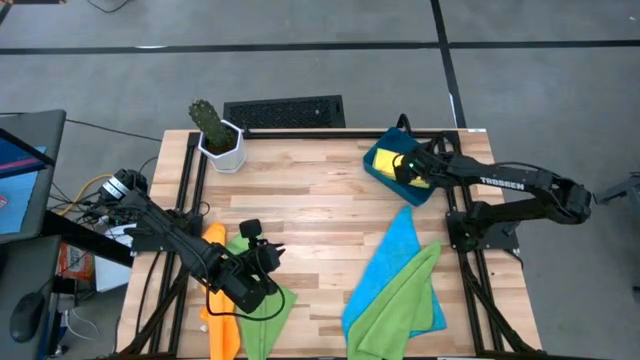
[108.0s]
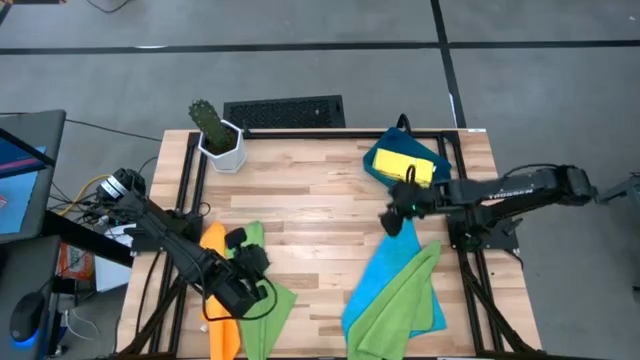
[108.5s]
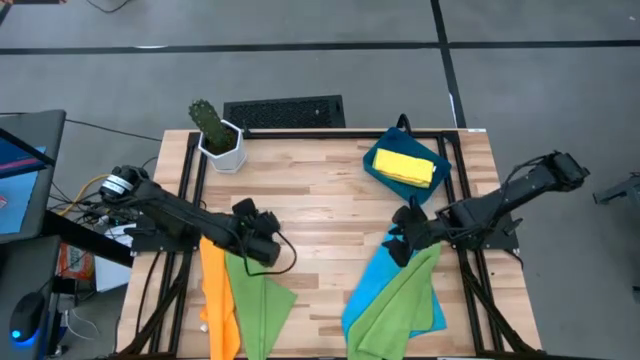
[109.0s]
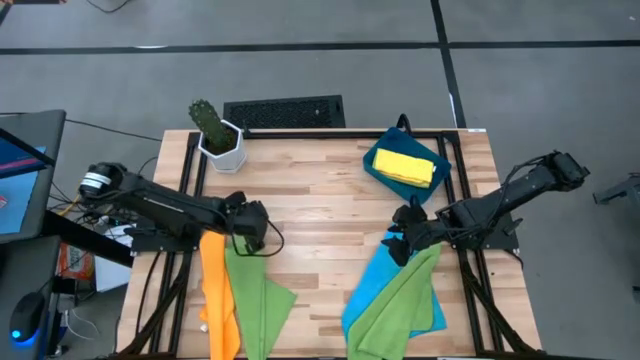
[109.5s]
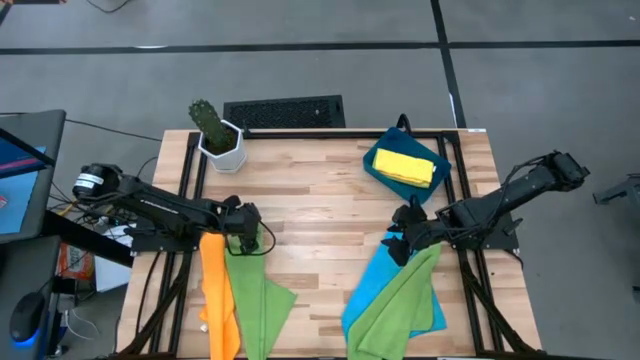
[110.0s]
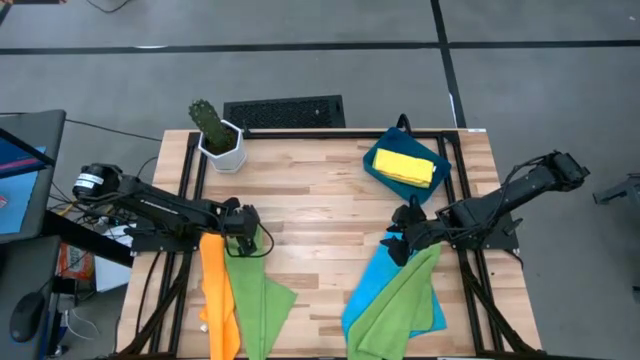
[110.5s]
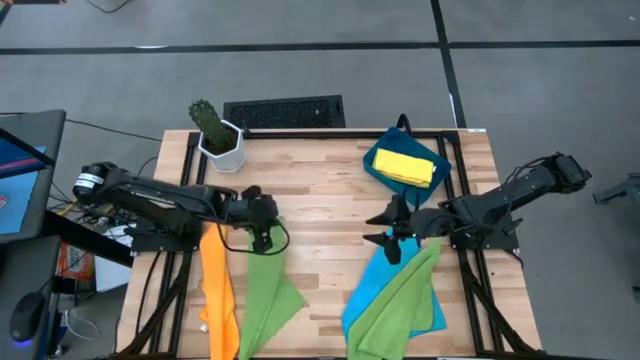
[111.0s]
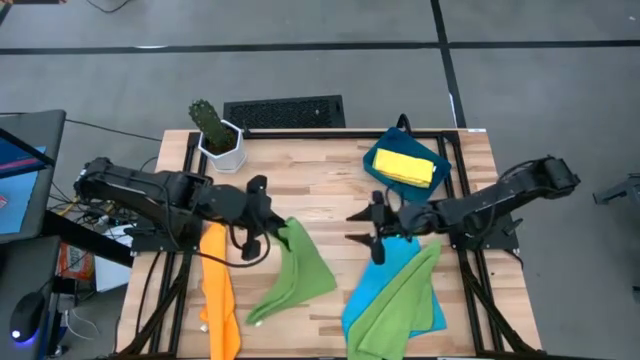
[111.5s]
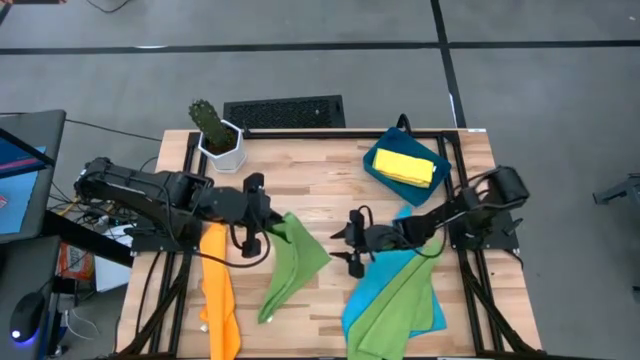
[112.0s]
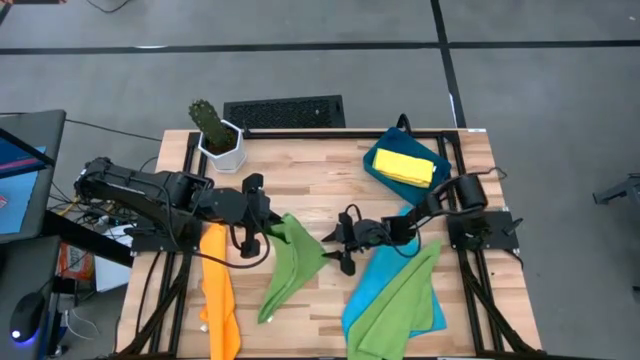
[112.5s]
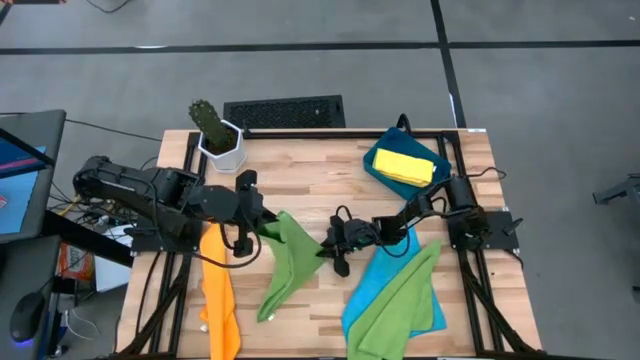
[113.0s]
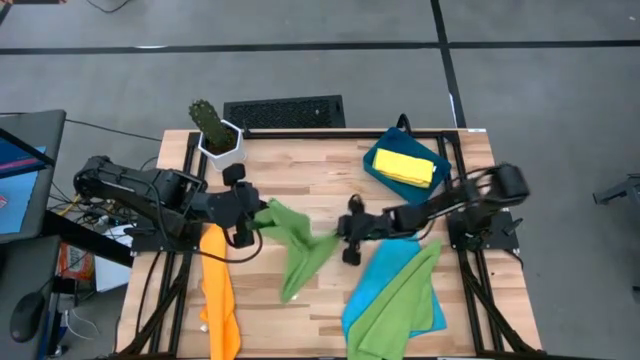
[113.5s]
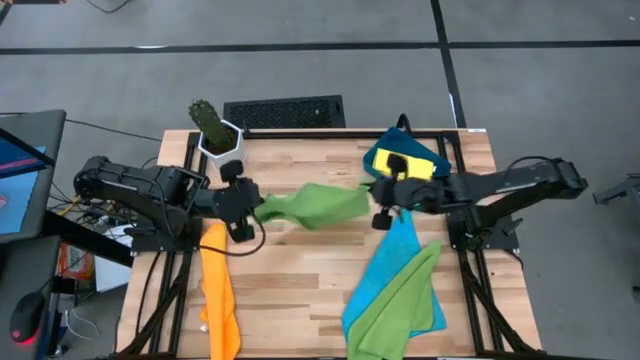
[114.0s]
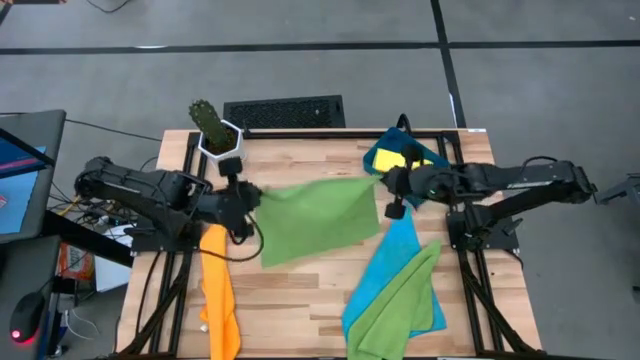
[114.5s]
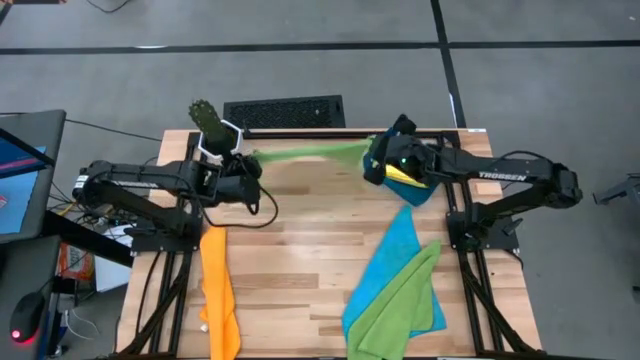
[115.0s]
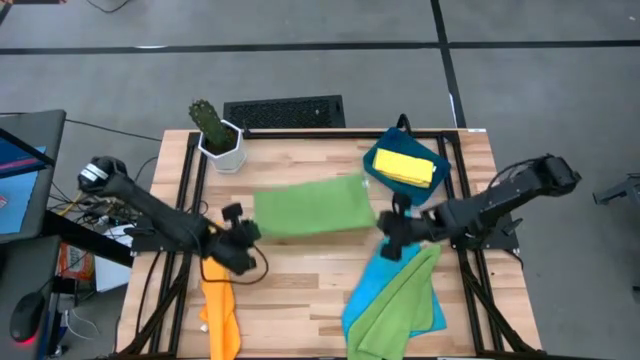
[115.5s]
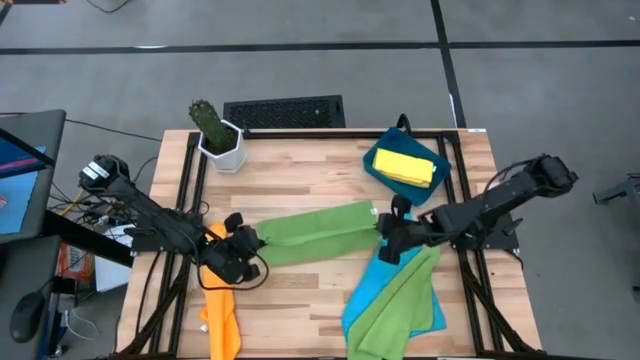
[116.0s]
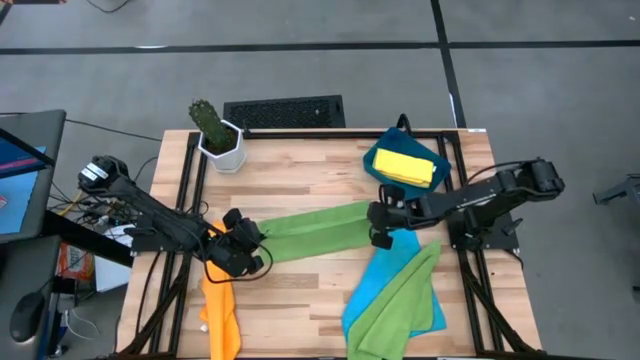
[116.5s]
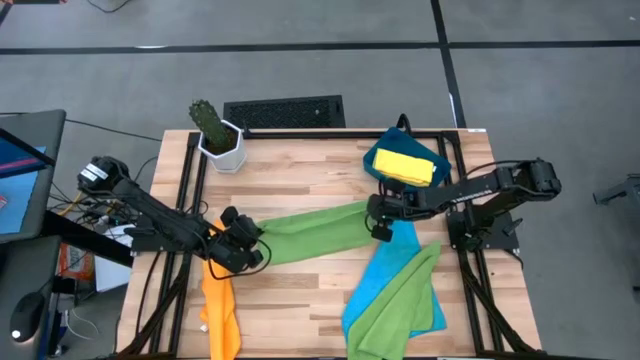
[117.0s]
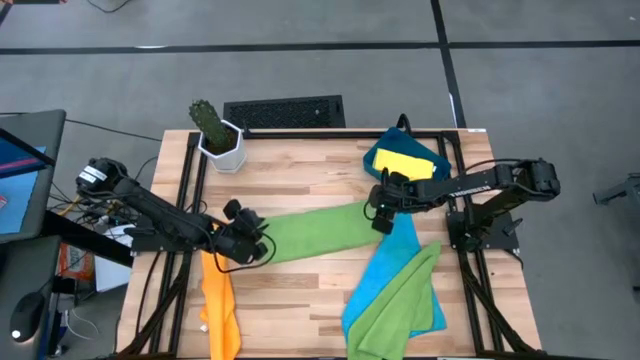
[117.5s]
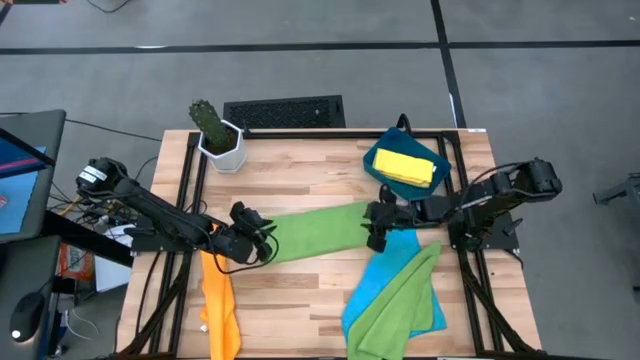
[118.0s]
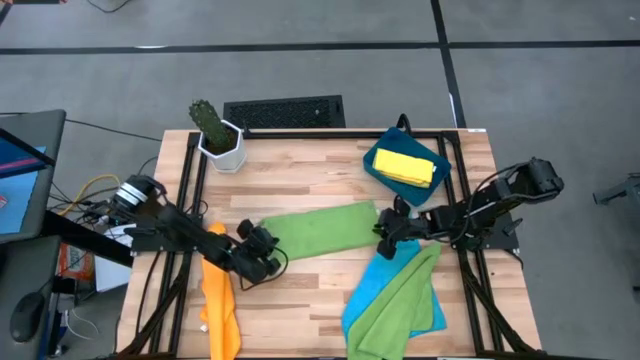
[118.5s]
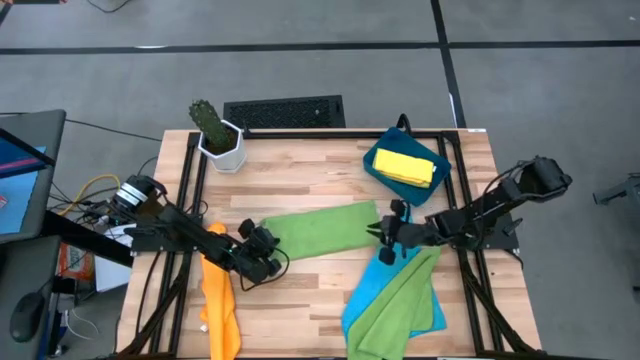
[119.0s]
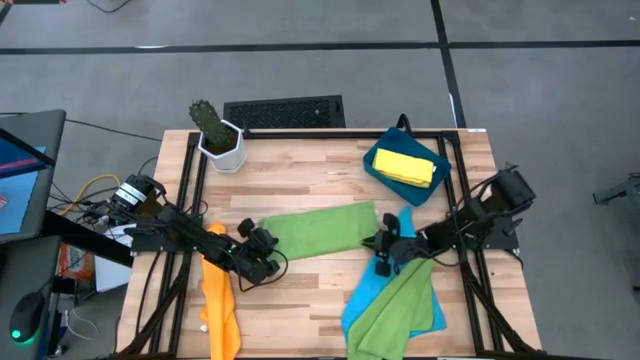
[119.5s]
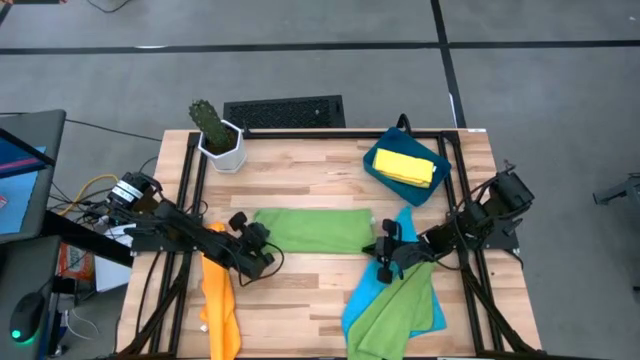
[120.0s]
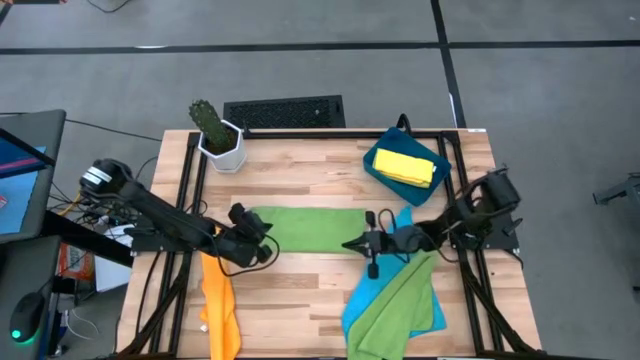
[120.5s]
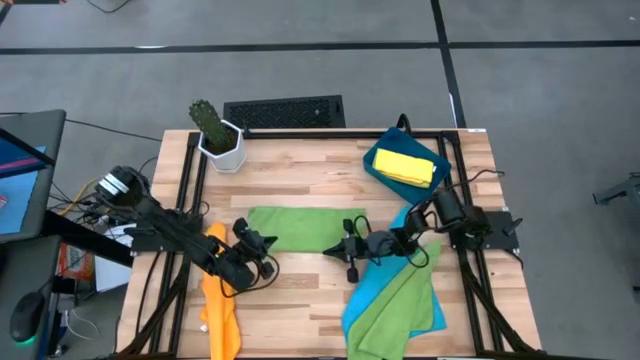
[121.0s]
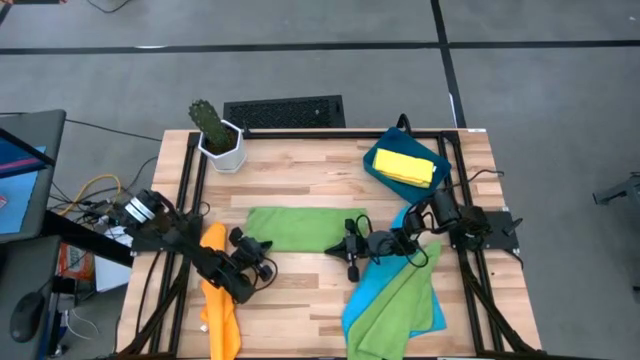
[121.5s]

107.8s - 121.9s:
Task: Fold microfiber towels
Fold the left green microfiber cloth

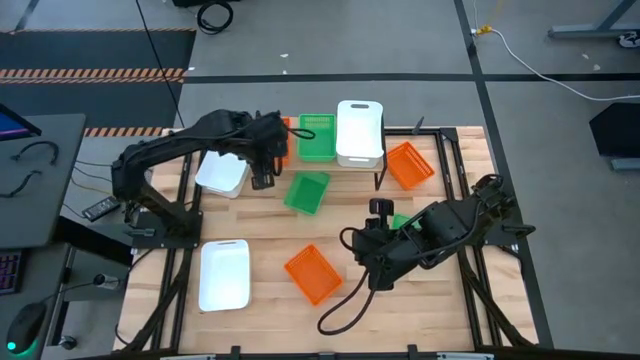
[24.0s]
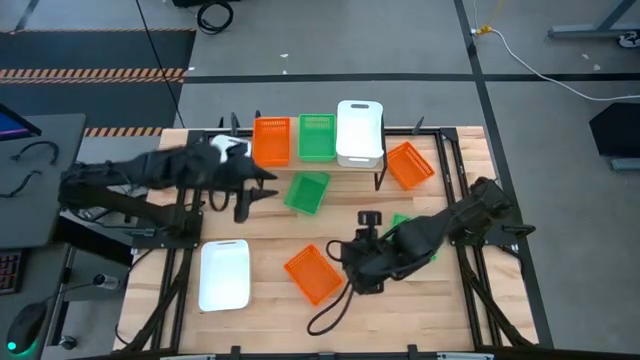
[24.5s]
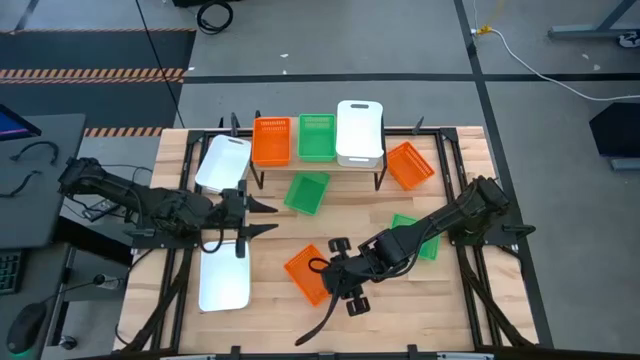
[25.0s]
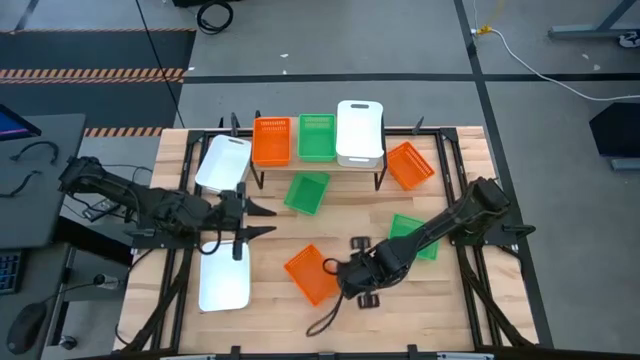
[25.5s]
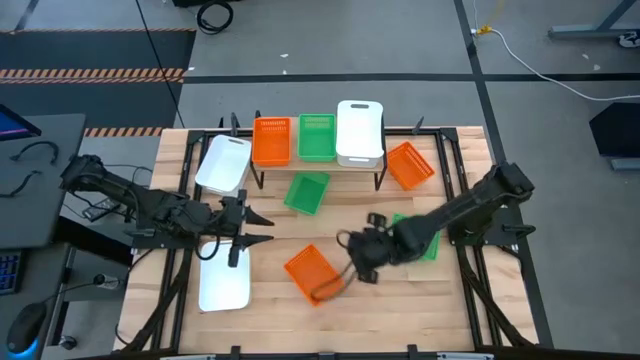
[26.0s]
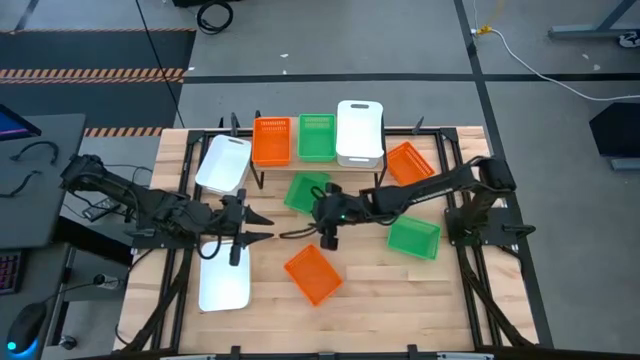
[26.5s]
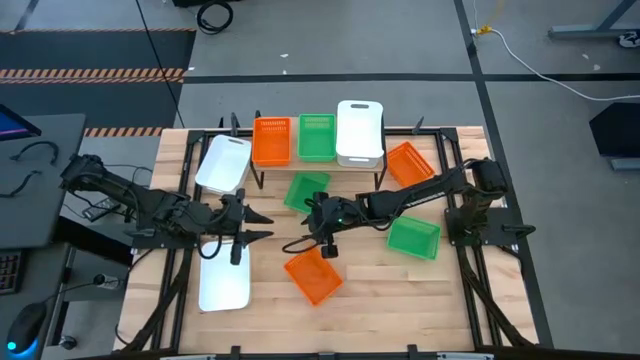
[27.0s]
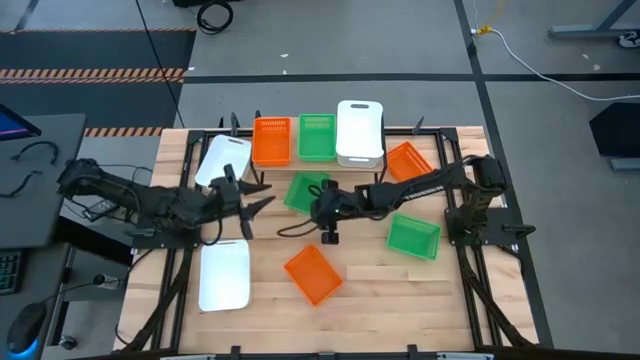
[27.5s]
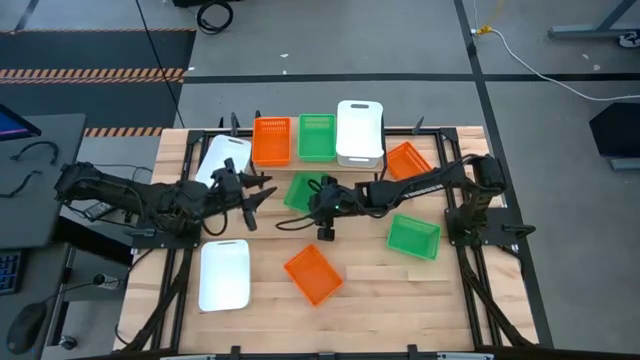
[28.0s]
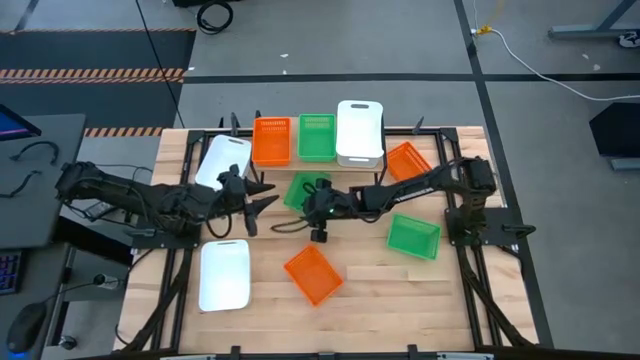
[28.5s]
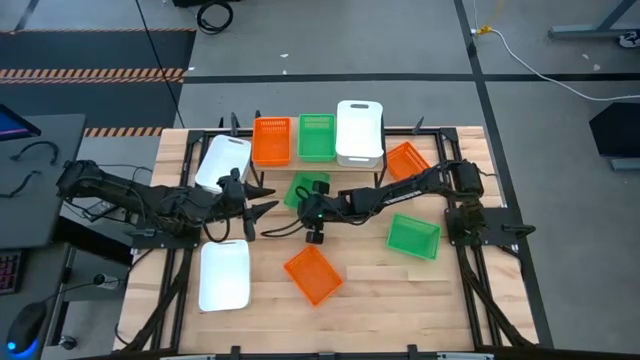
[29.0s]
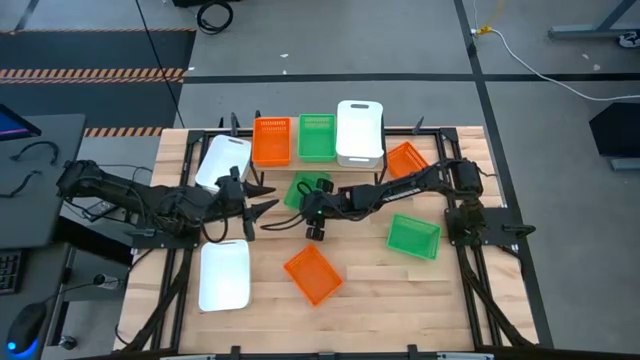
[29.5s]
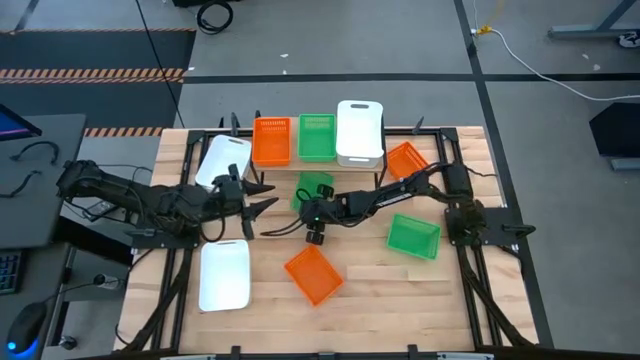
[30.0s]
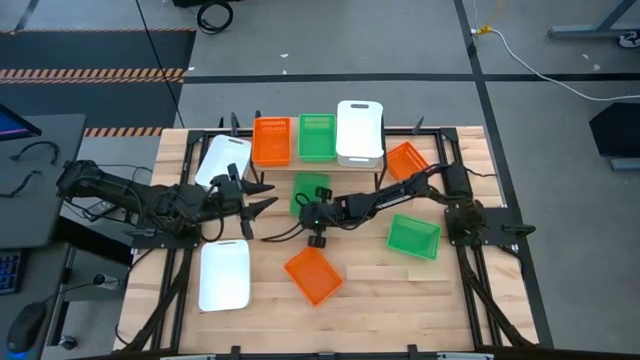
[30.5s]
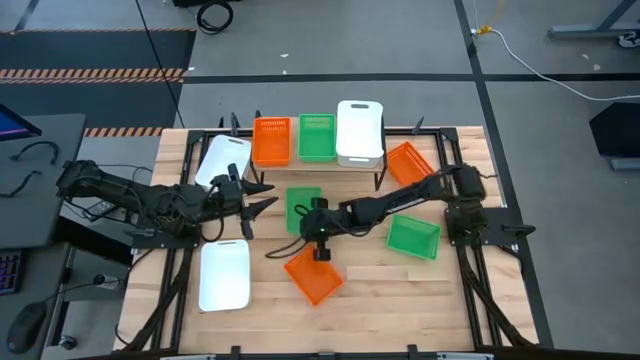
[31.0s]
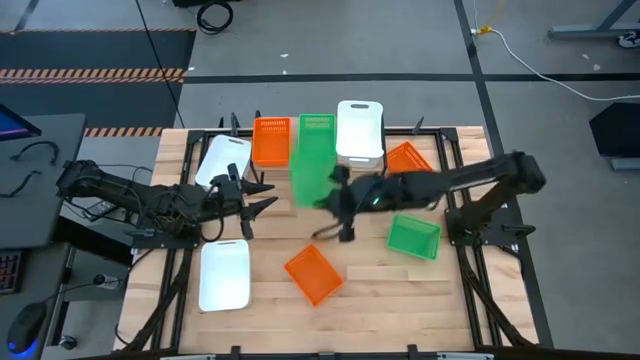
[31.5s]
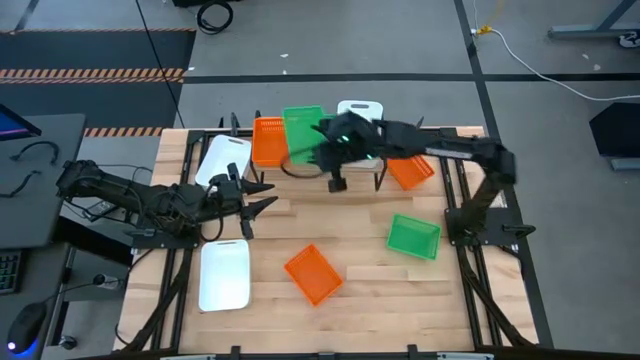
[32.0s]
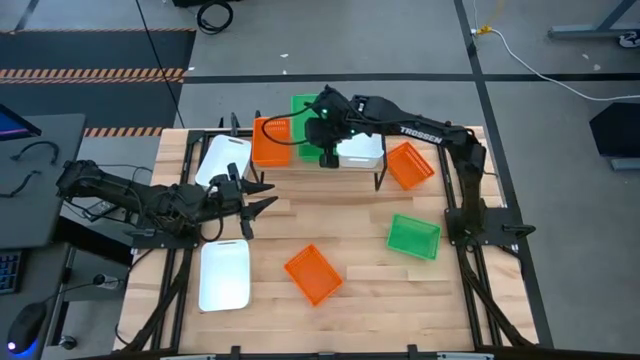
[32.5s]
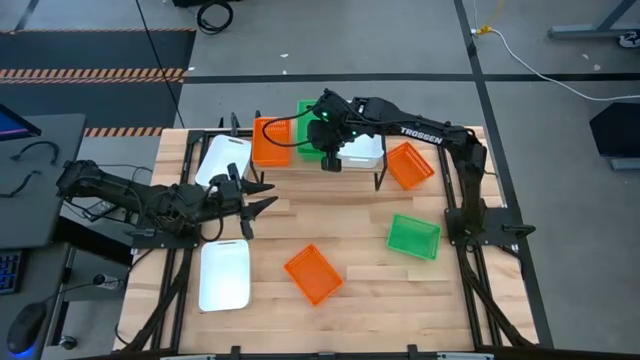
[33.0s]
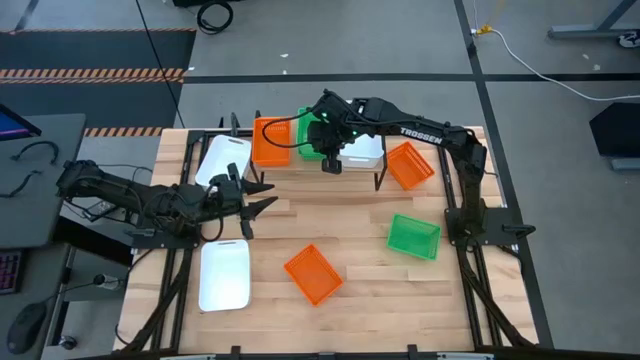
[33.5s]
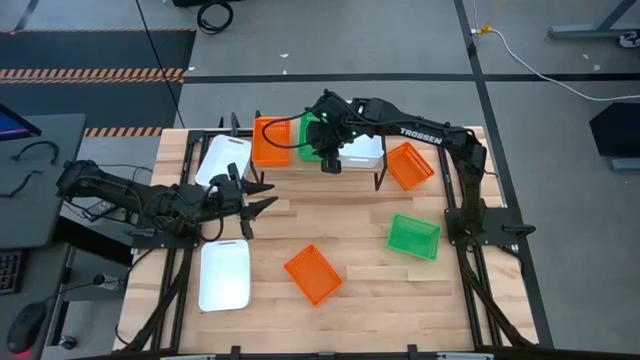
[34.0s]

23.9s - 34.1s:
Task: Stack baskets on shelf by color
Stack the left green bin on top of the green bin on the shelf
